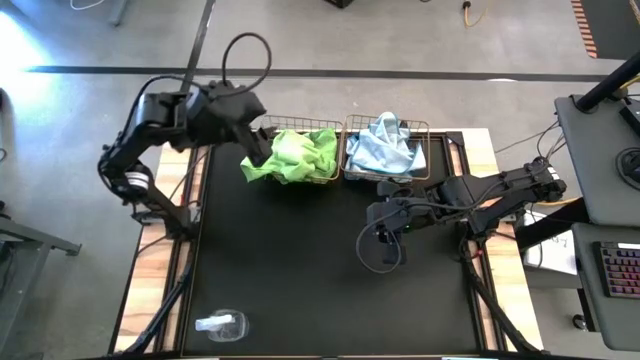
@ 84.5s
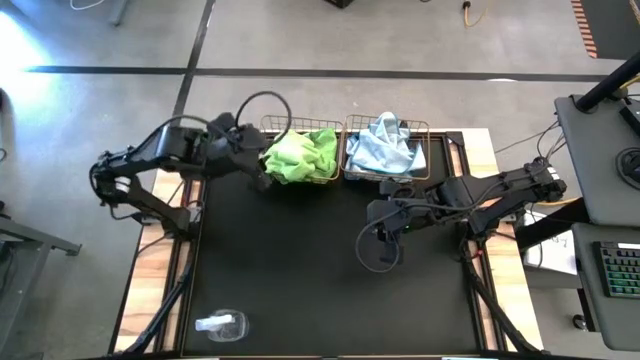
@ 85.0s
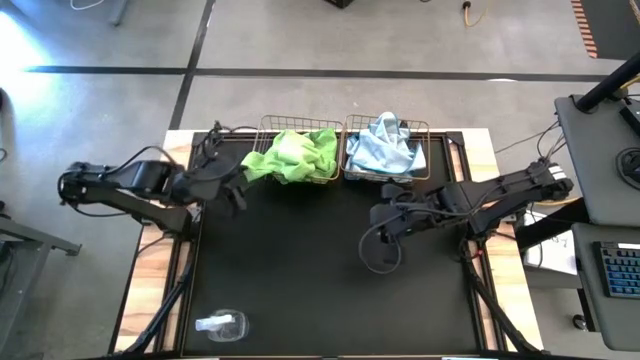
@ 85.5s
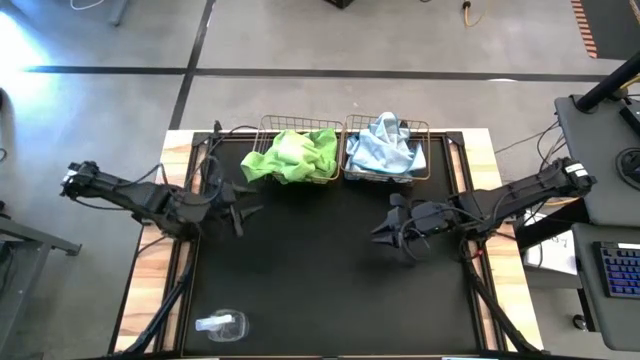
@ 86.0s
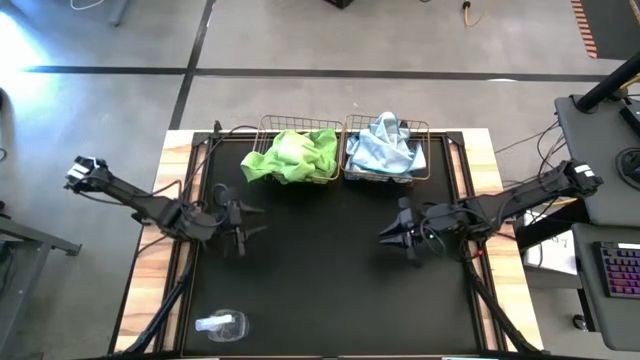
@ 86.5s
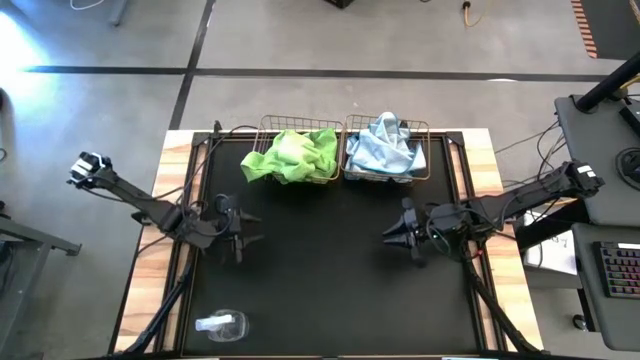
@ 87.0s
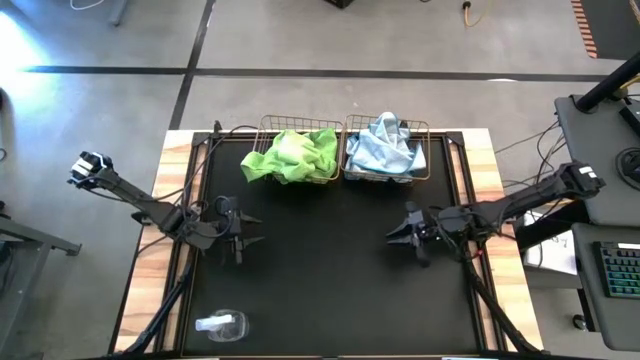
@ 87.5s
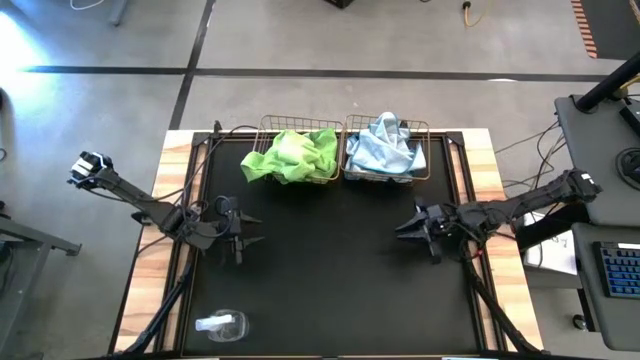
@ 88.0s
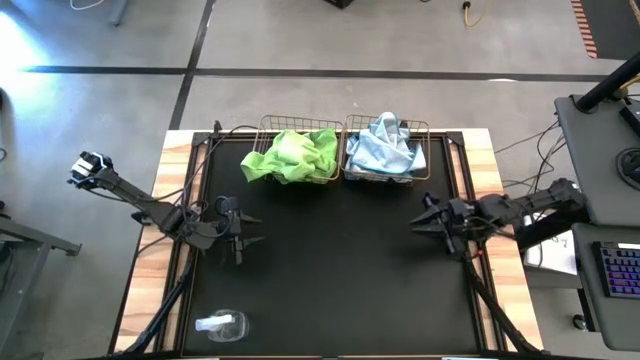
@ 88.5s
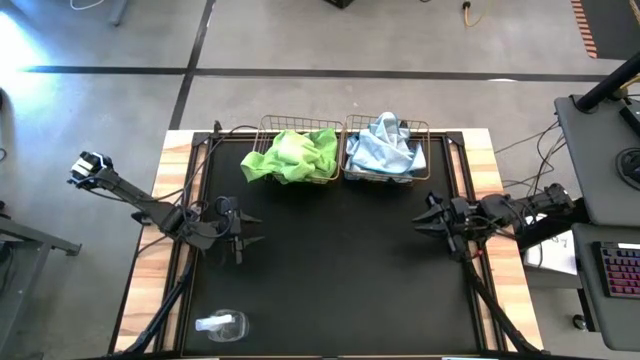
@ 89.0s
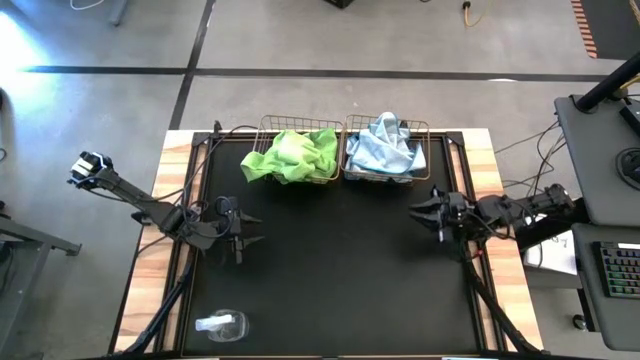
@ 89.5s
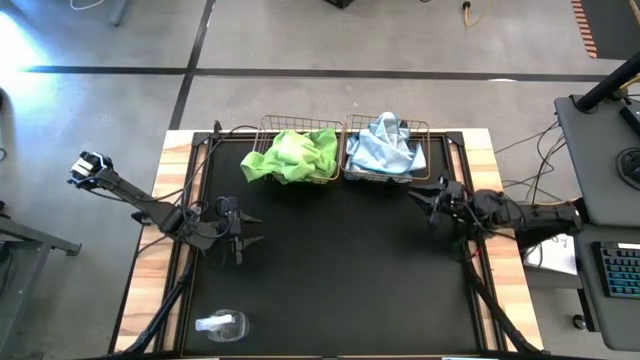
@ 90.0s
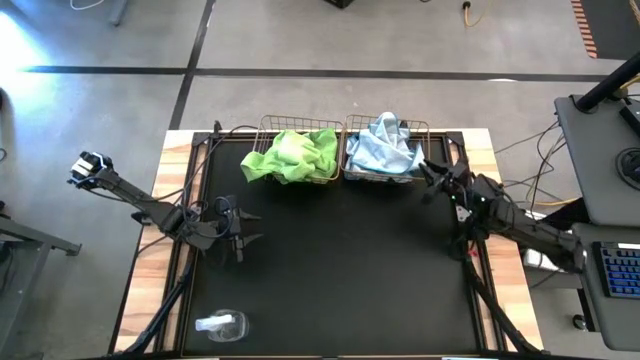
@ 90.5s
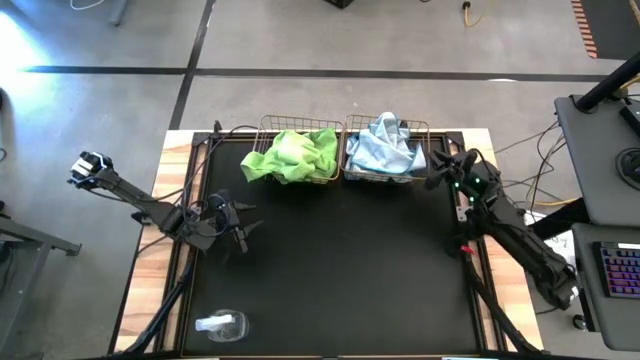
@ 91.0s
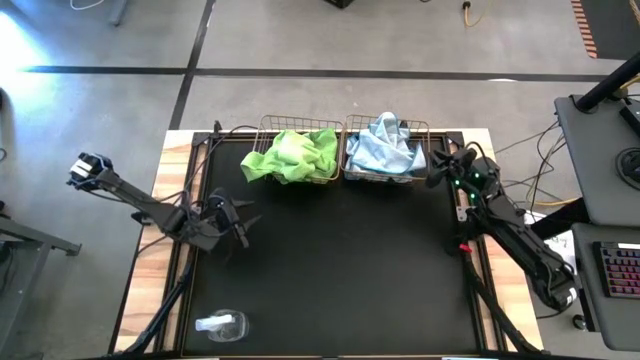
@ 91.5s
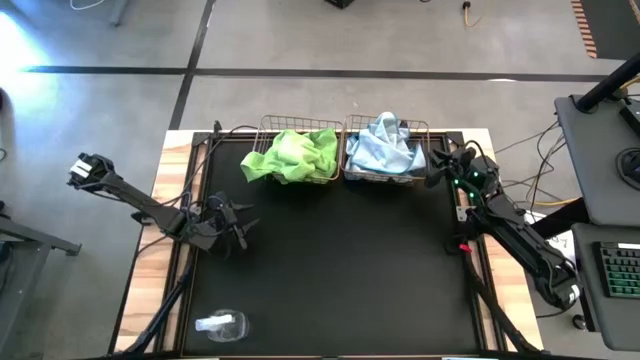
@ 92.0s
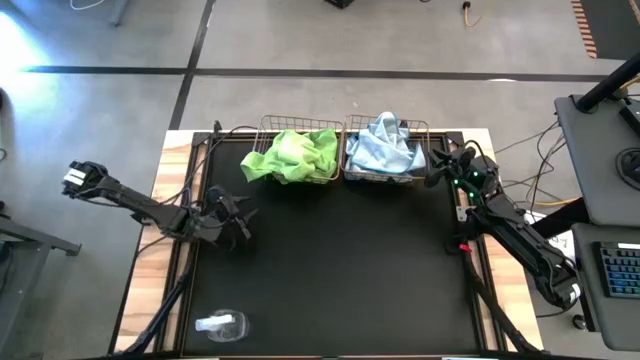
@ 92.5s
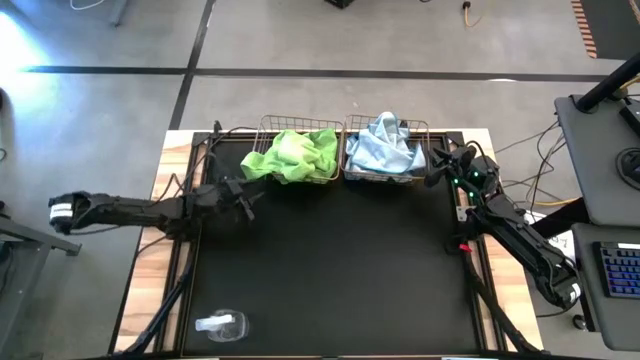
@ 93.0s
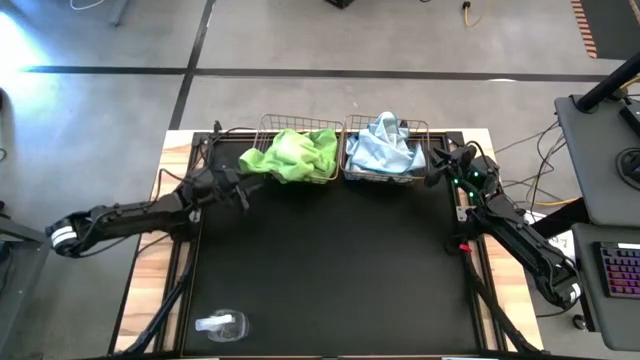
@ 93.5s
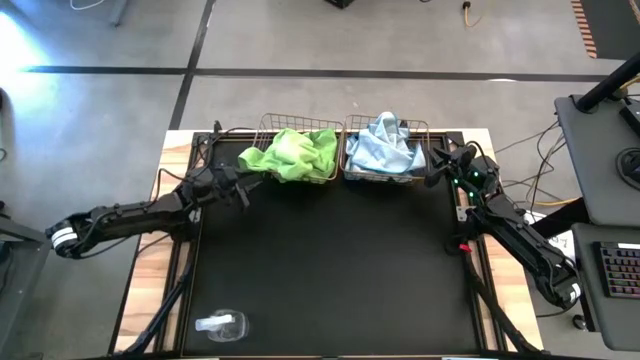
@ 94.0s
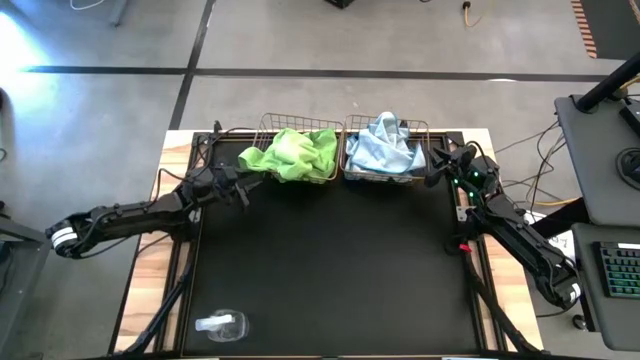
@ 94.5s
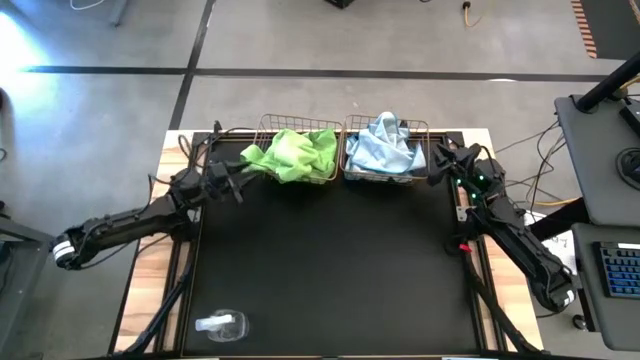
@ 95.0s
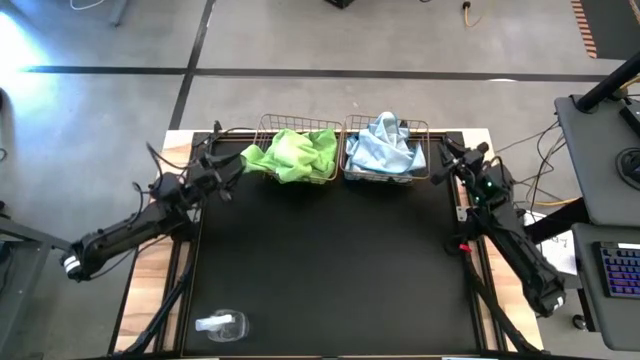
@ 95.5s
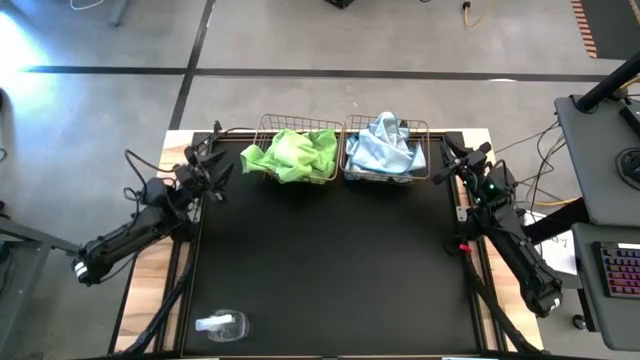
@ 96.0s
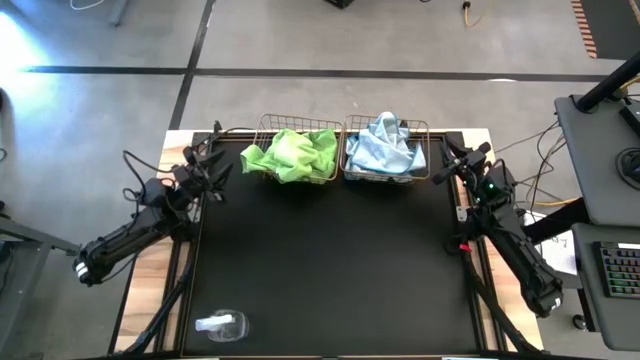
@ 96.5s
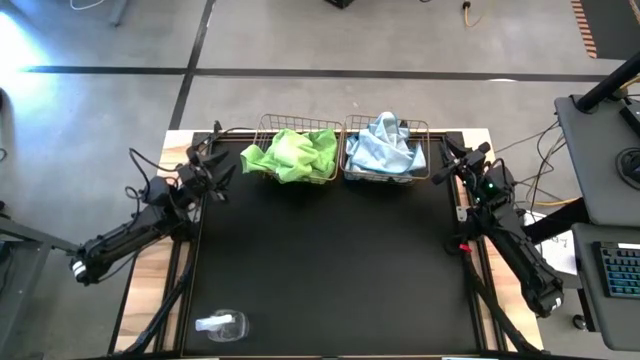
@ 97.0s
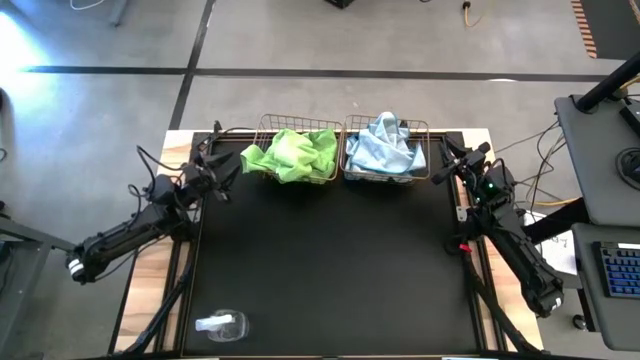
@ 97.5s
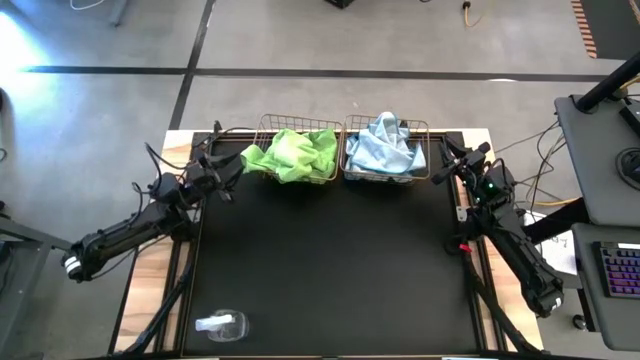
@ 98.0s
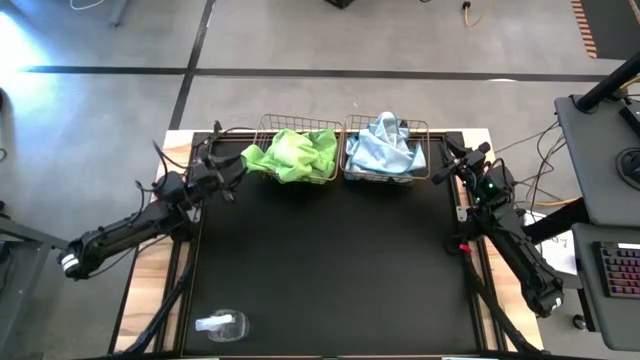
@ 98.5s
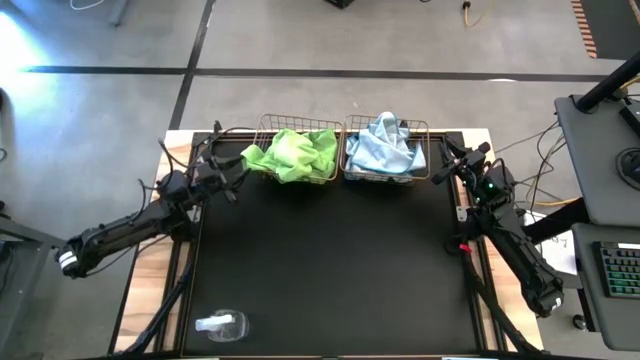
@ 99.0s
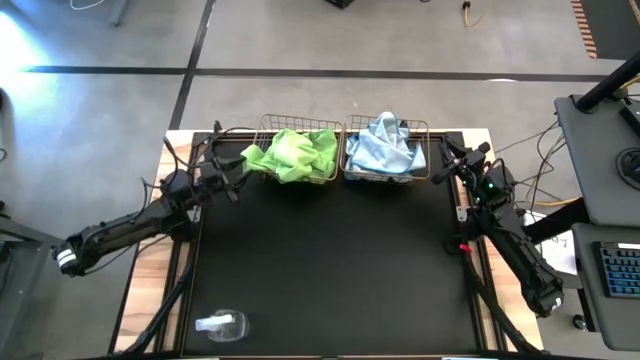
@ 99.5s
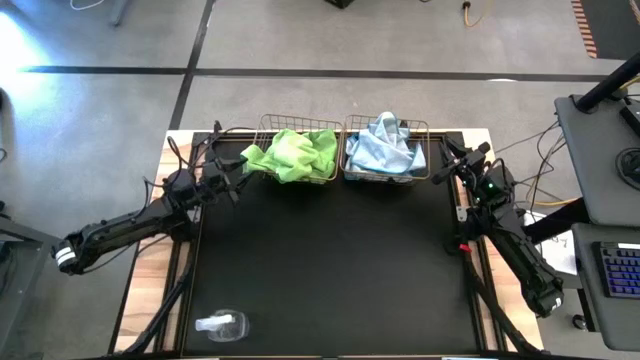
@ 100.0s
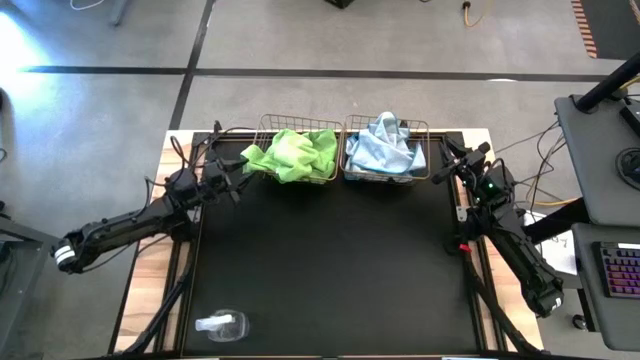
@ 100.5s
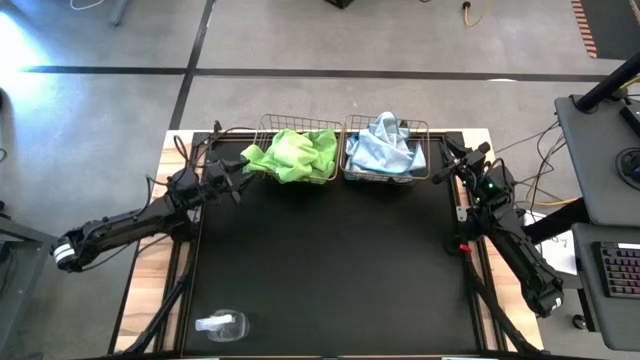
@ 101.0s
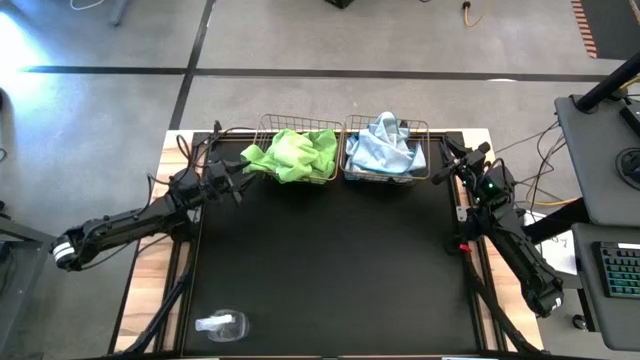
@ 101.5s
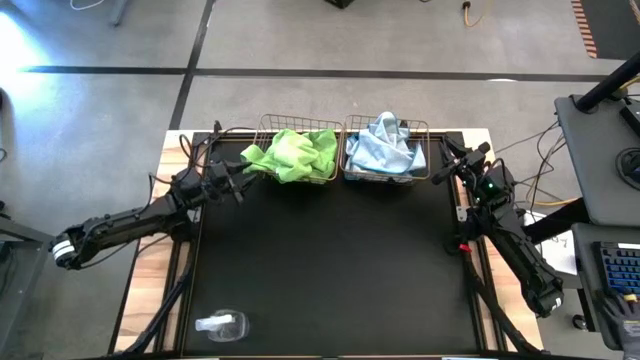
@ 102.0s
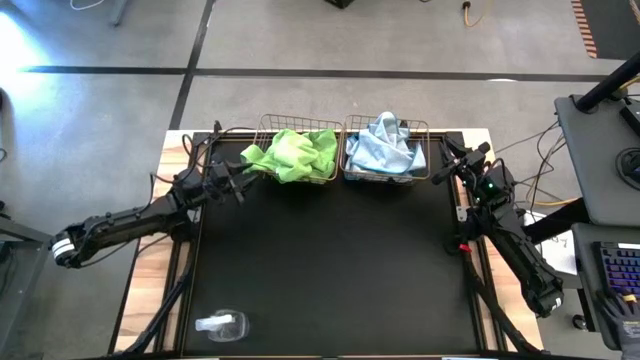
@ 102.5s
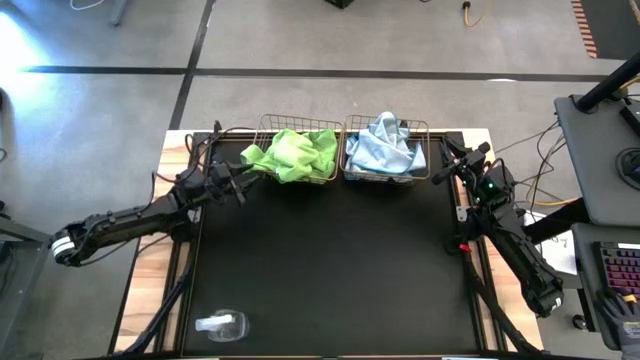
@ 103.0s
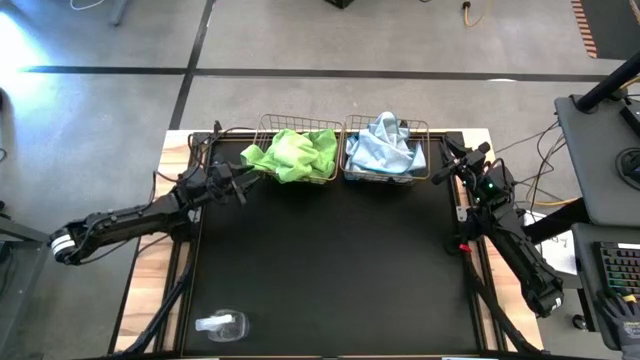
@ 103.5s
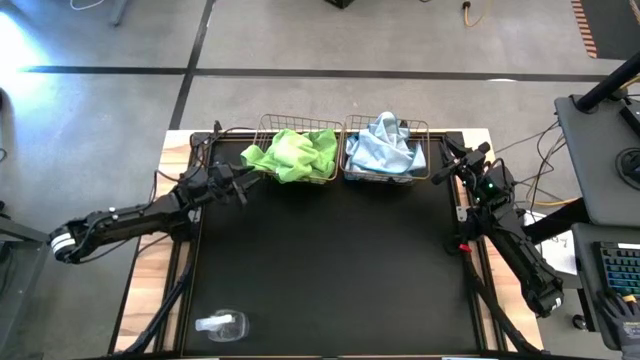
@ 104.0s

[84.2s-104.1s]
Task: Sort microfiber towel by color & place in baskets
Return to Home Position

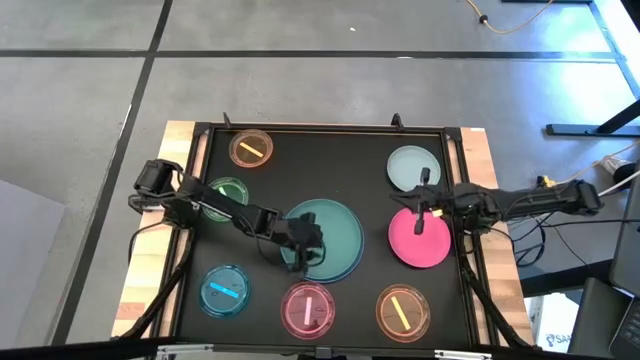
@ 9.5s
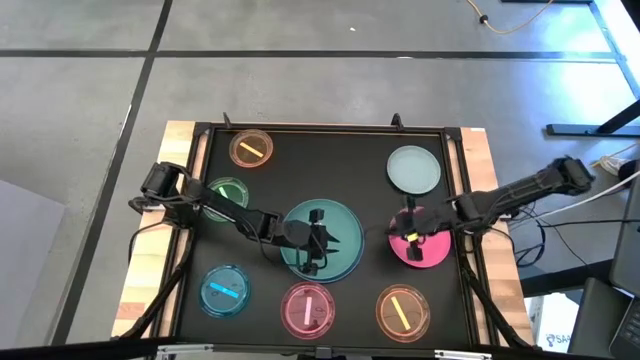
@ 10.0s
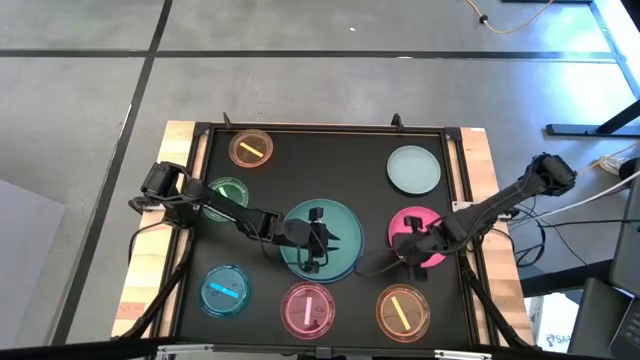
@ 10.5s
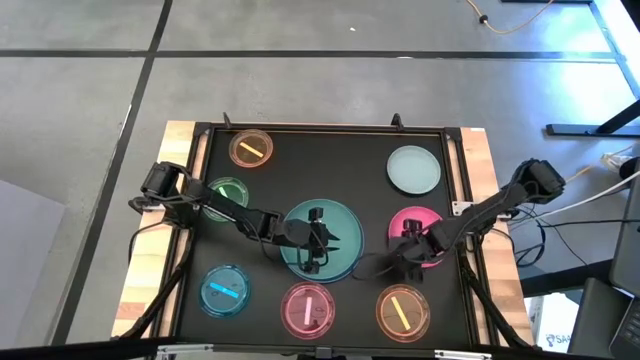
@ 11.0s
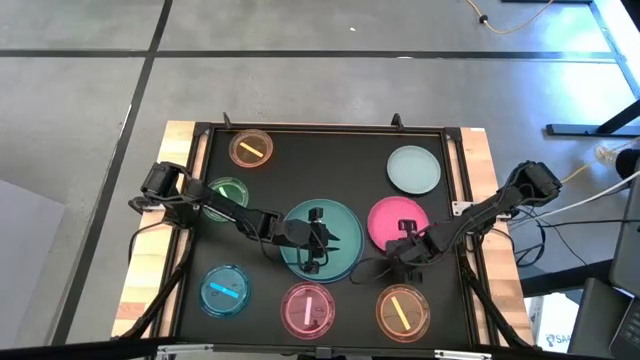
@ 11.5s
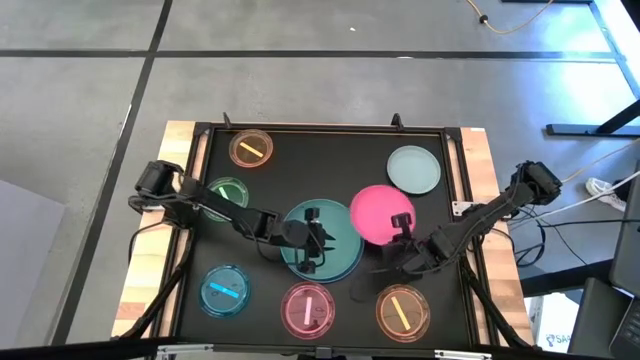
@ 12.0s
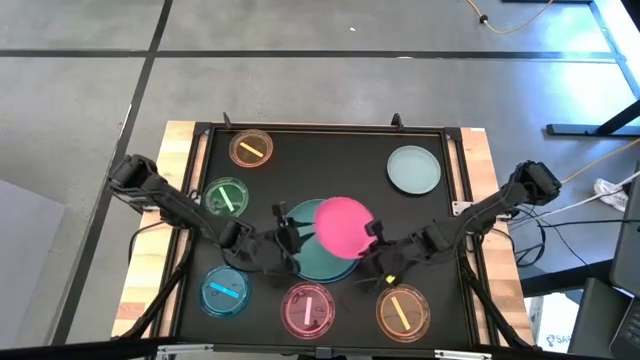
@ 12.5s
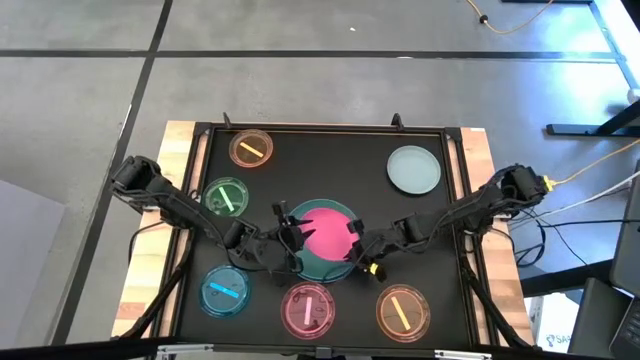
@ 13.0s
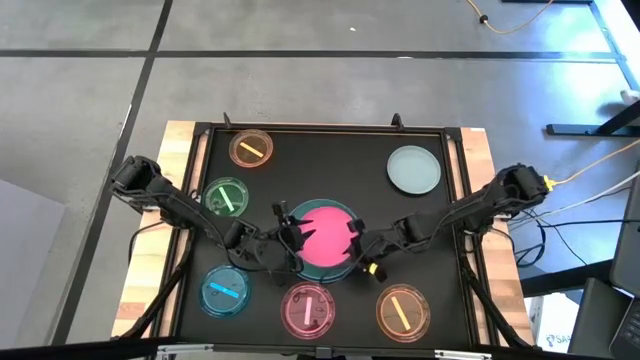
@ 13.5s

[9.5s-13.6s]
Task: Stack plastic plates
Stack the medium pink plate on the big green plate
